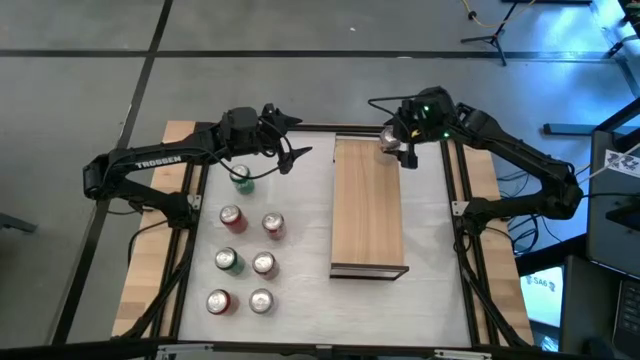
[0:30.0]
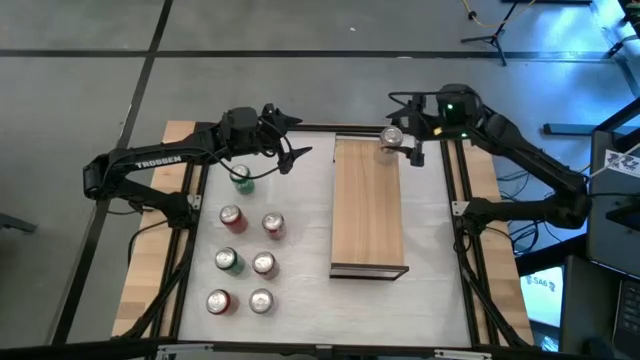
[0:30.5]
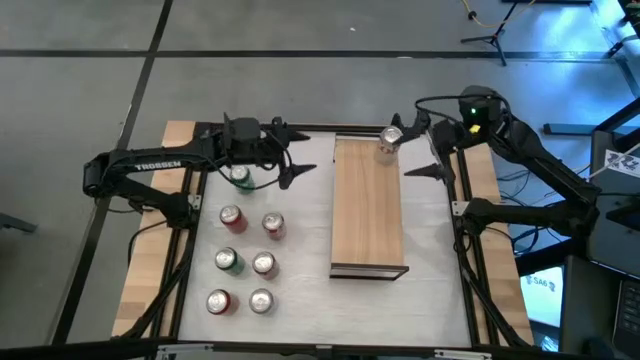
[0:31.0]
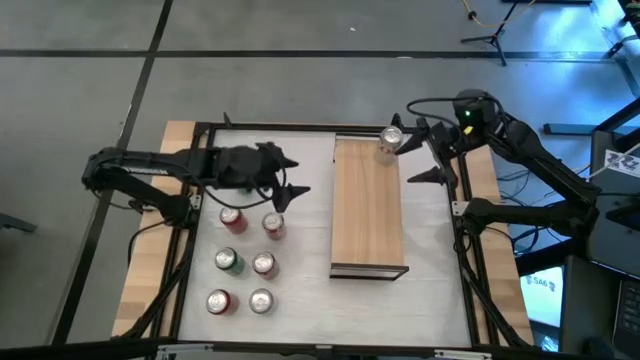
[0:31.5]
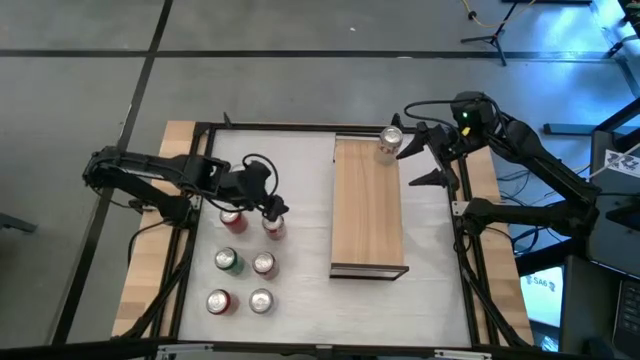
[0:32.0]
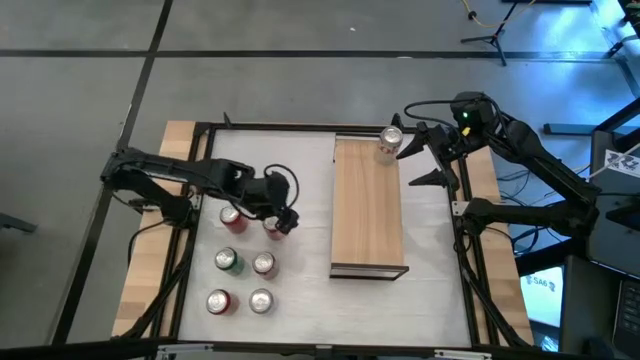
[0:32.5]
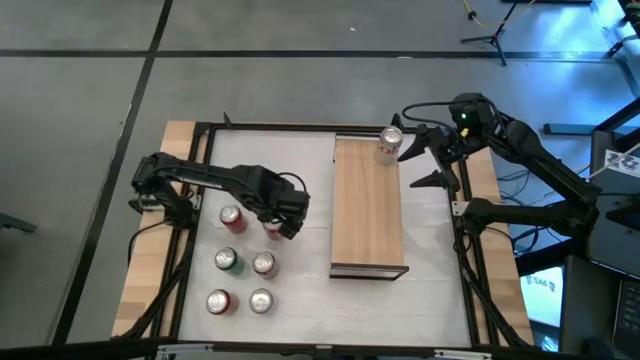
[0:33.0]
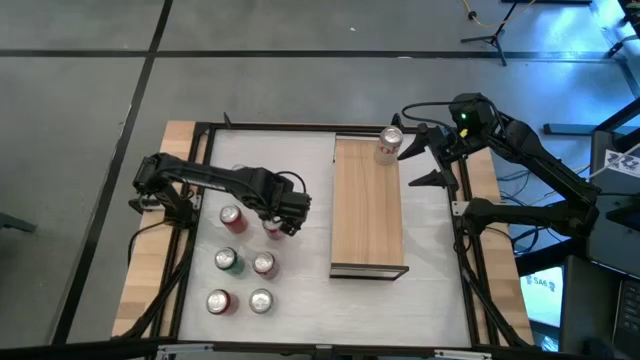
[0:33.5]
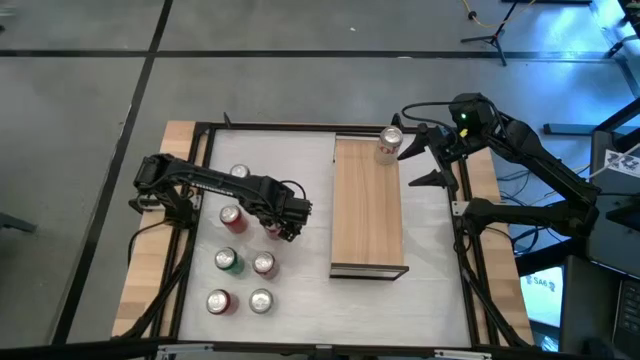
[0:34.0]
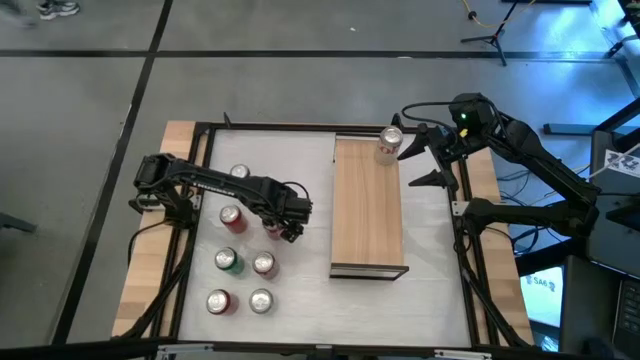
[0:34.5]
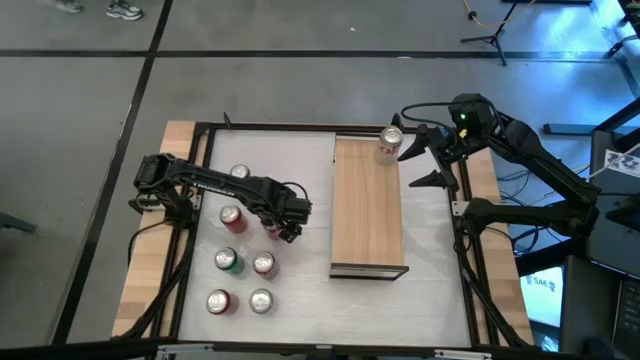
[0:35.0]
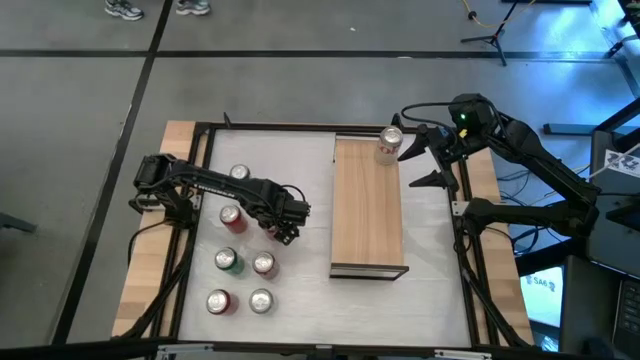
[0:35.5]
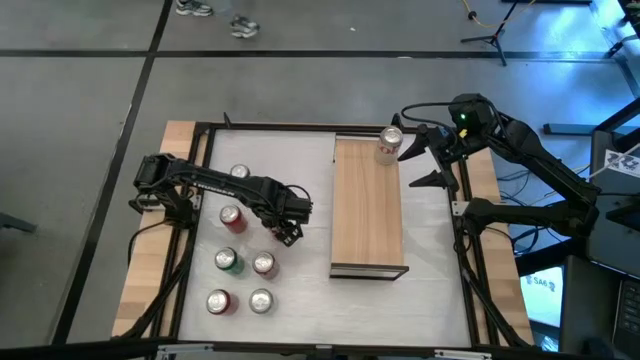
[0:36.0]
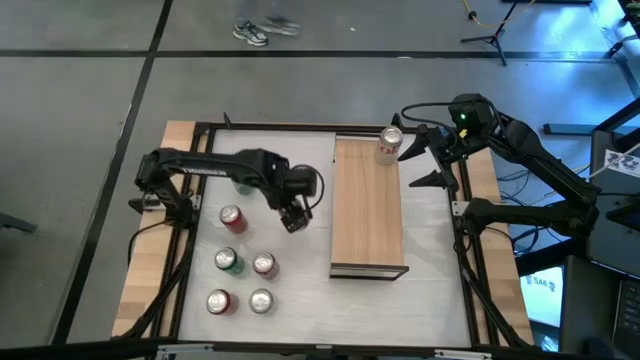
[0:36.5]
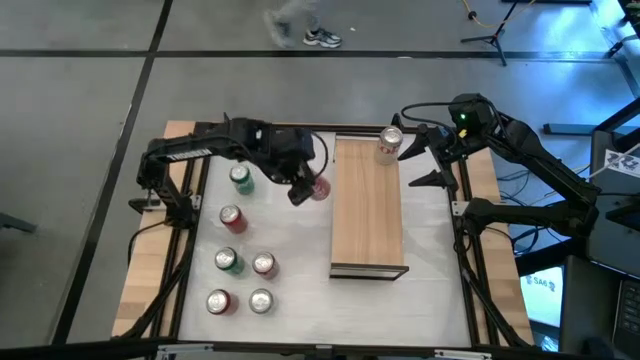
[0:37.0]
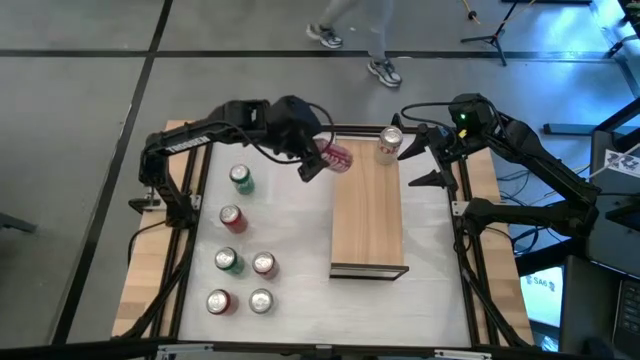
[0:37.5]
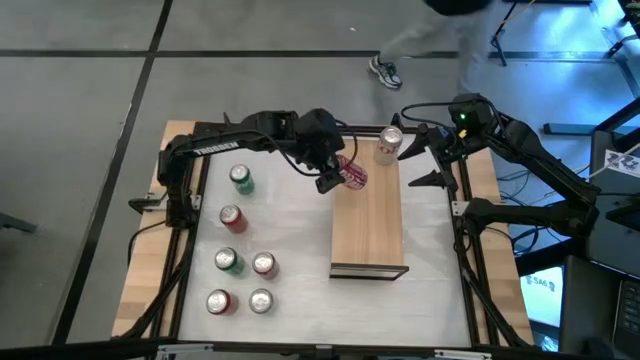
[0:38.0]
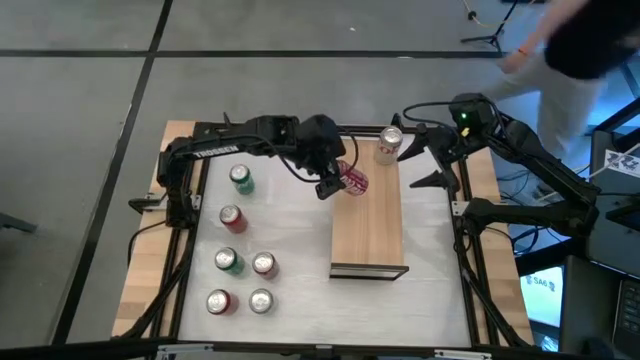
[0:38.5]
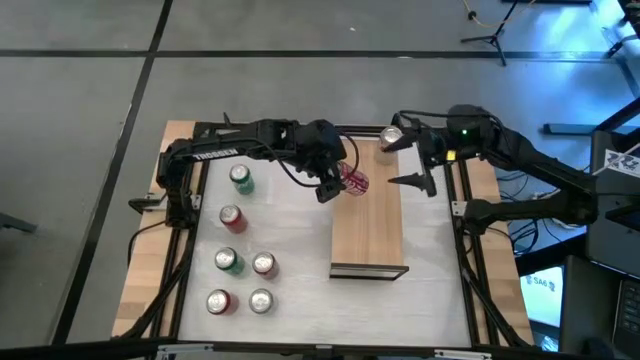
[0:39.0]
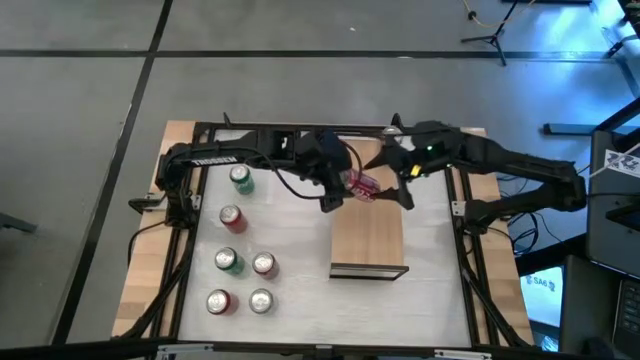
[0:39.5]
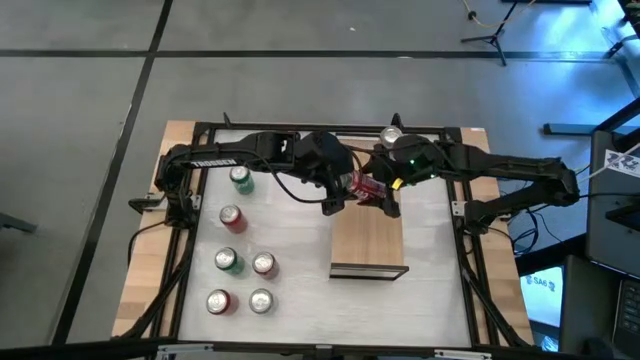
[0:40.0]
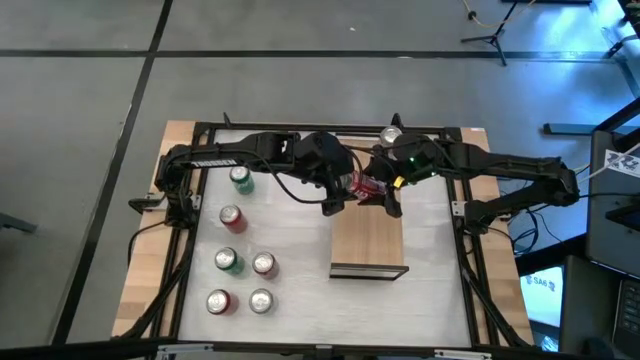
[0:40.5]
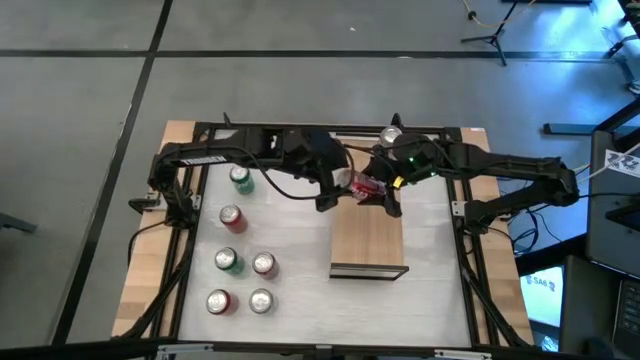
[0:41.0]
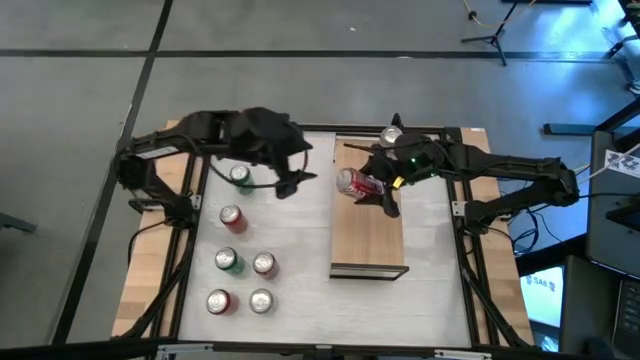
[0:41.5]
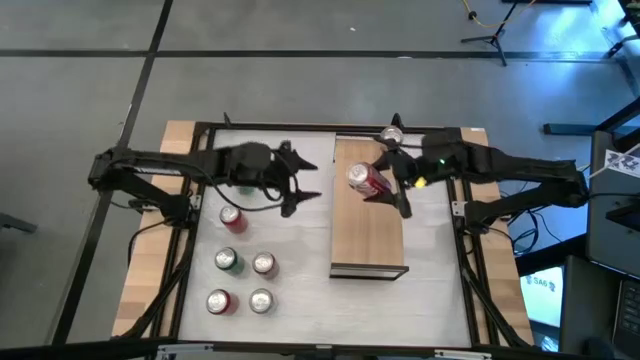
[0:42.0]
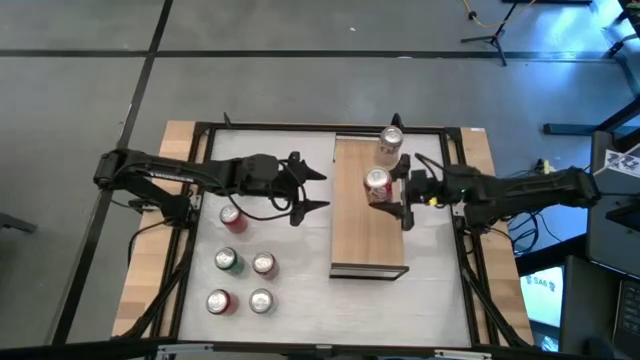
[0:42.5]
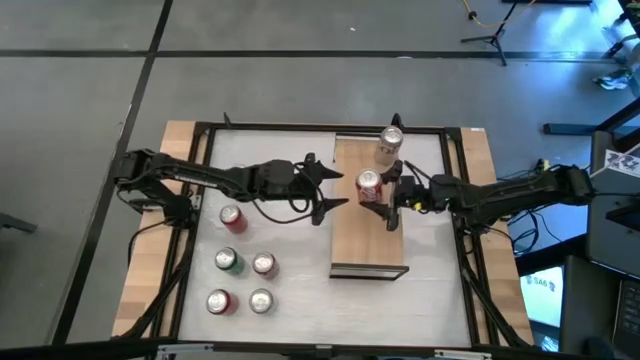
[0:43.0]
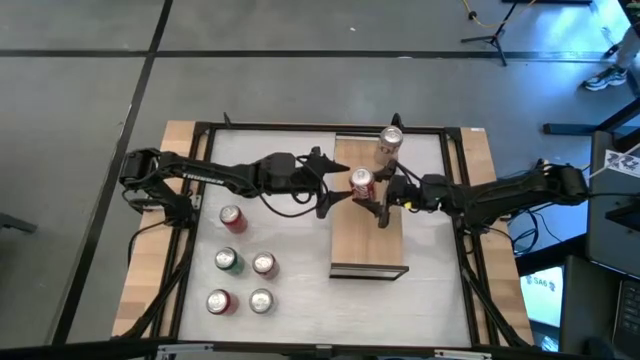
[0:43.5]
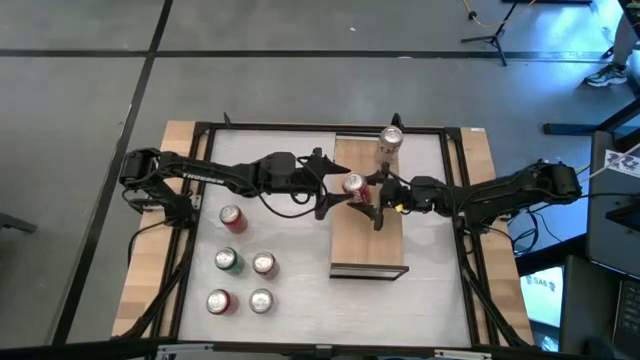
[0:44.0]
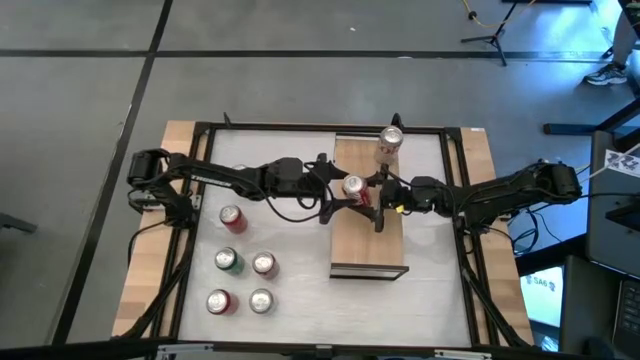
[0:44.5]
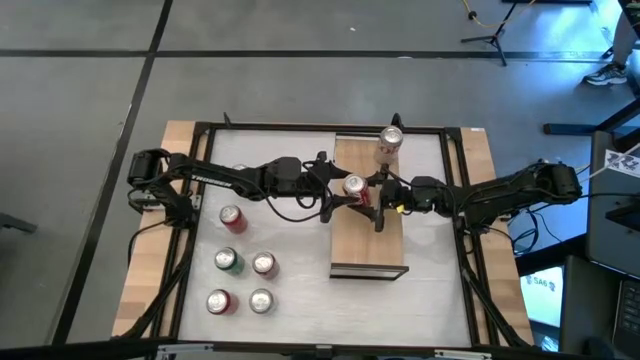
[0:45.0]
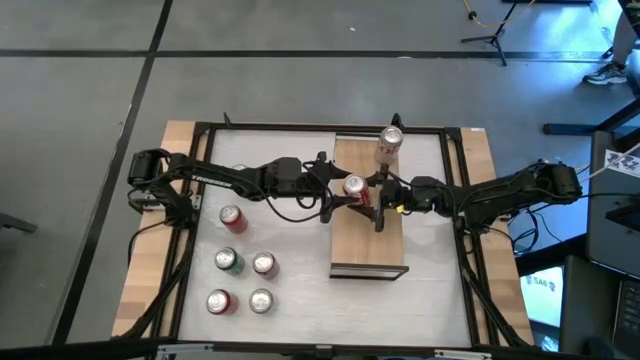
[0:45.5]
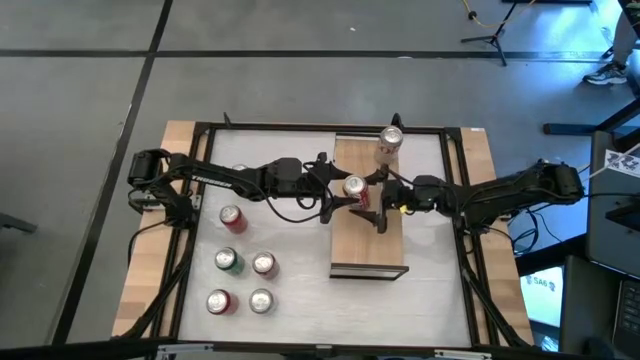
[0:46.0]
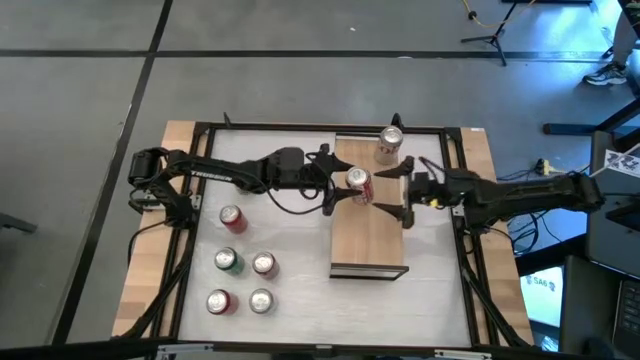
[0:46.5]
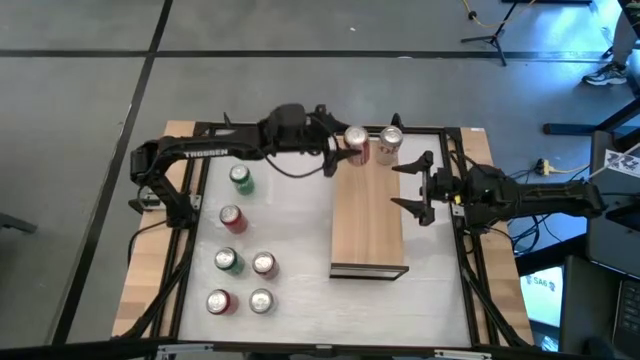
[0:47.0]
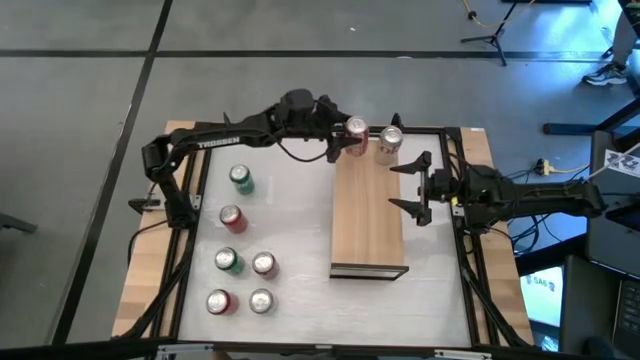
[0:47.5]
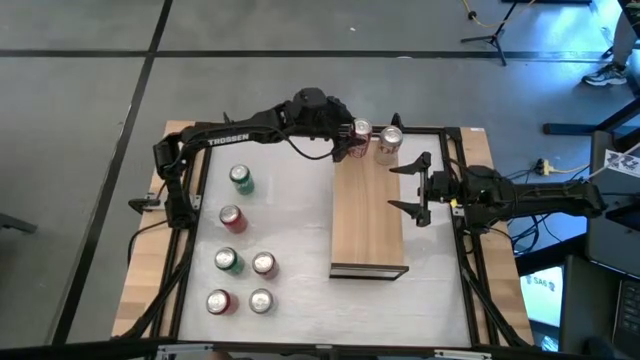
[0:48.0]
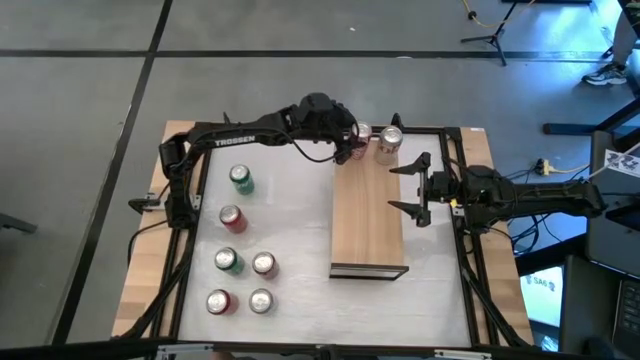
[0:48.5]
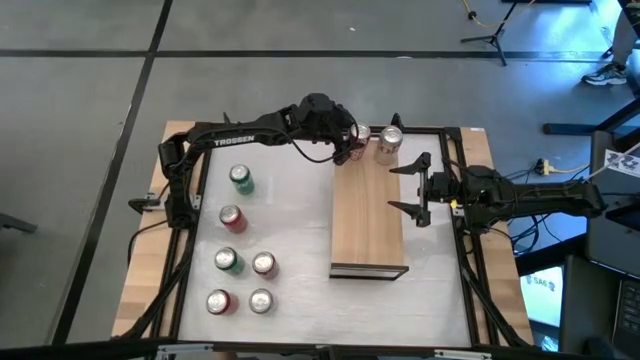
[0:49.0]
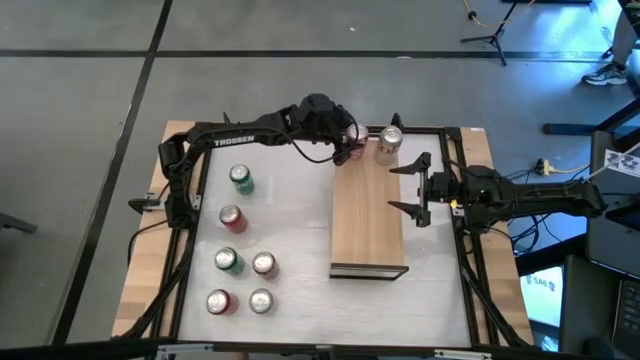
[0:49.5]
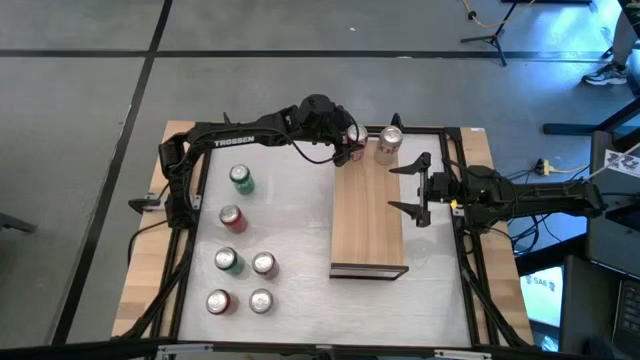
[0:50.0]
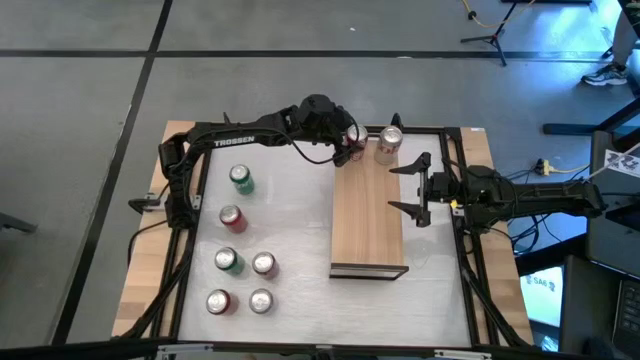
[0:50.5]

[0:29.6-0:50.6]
Task: Place canned beverage on shelf
Put the right red white soda can on the shelf

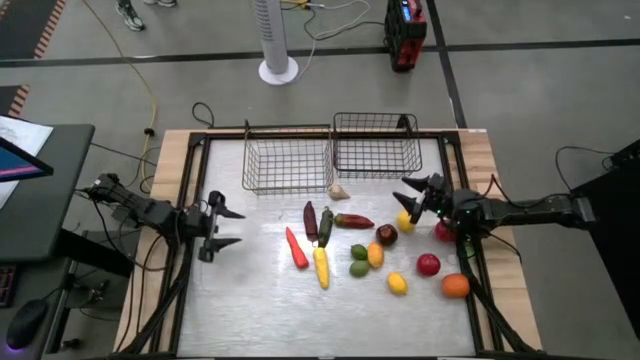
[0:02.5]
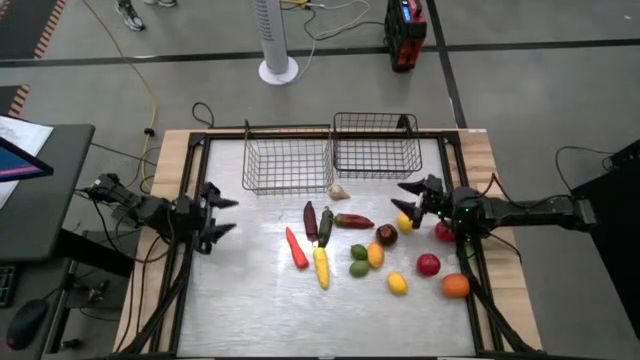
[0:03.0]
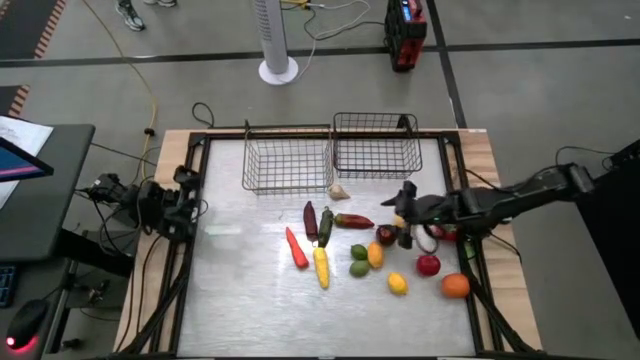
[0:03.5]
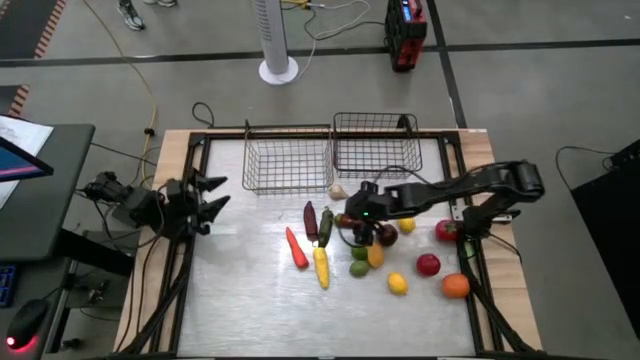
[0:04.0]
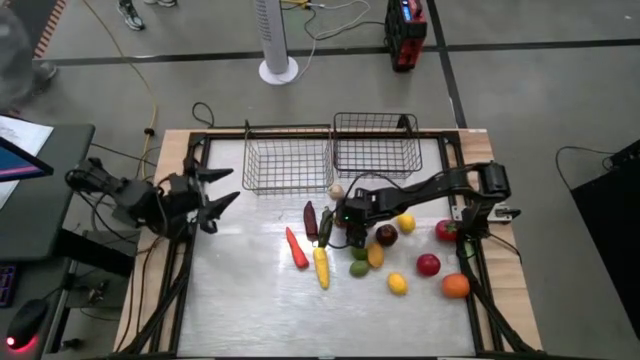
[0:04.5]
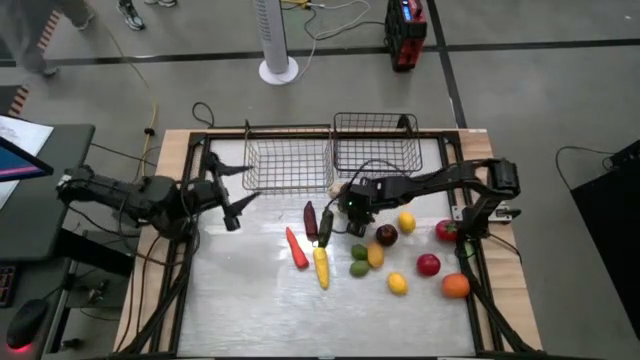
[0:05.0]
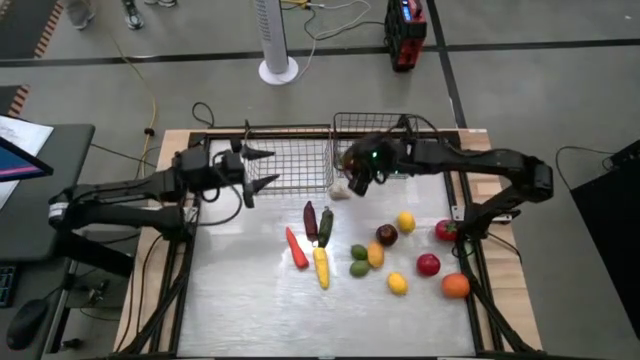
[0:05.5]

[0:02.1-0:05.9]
Task: Sort produce into baskets
Put the red chili pepper into the right wire basket
